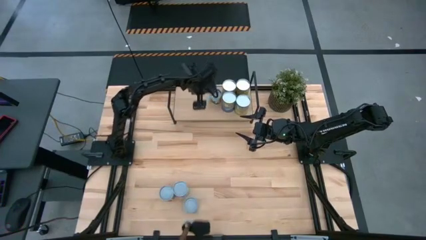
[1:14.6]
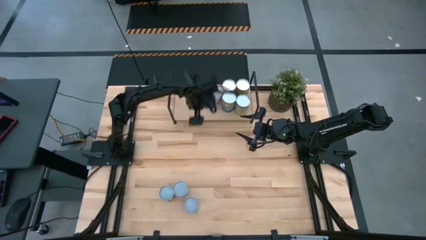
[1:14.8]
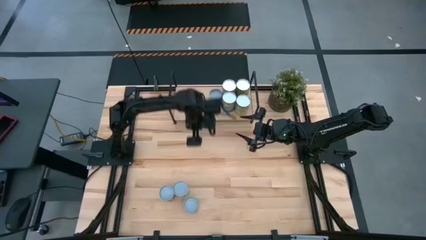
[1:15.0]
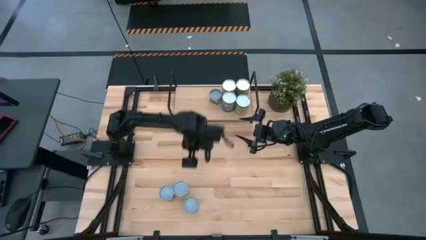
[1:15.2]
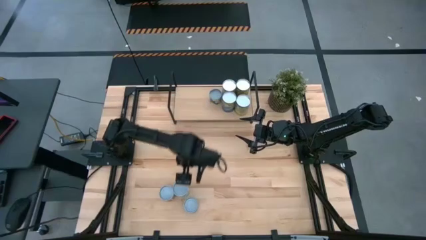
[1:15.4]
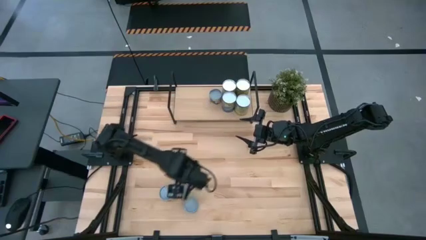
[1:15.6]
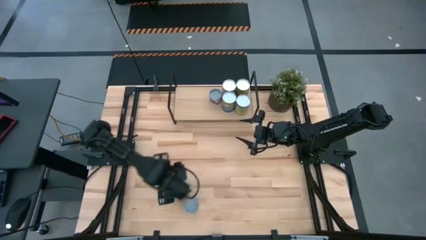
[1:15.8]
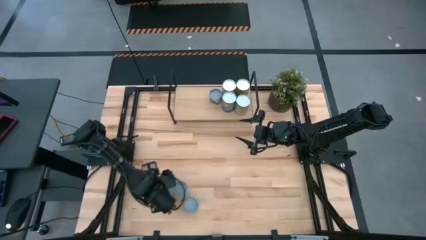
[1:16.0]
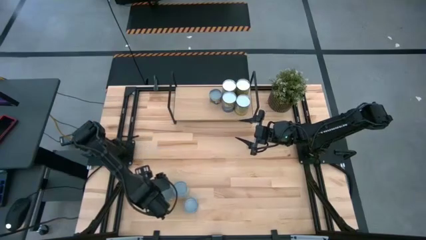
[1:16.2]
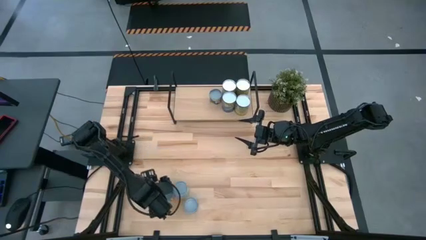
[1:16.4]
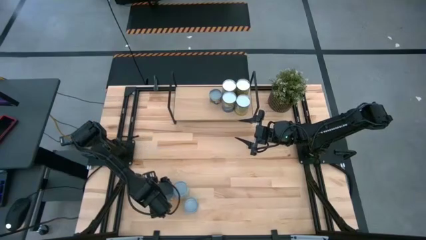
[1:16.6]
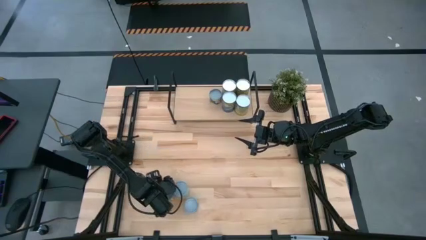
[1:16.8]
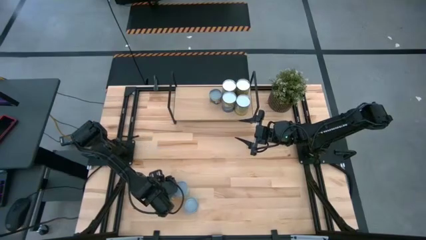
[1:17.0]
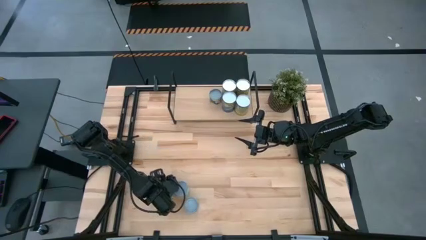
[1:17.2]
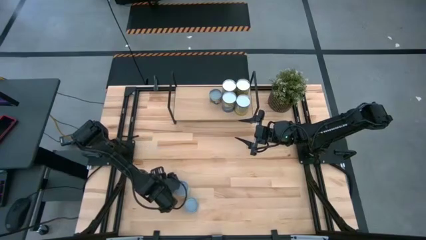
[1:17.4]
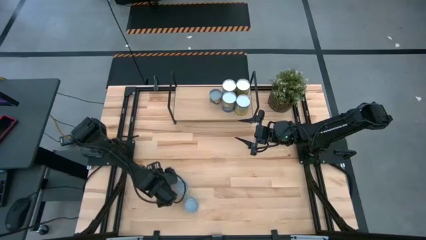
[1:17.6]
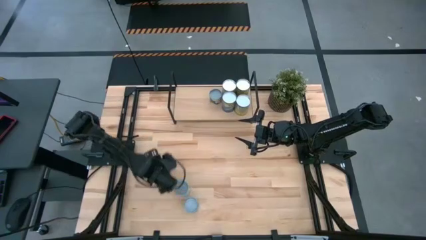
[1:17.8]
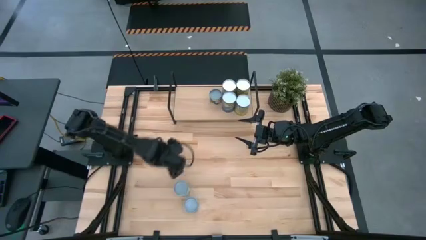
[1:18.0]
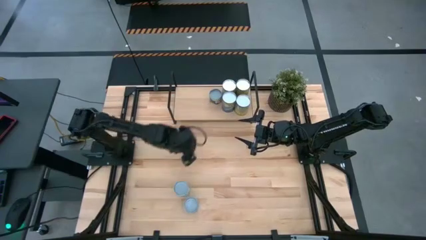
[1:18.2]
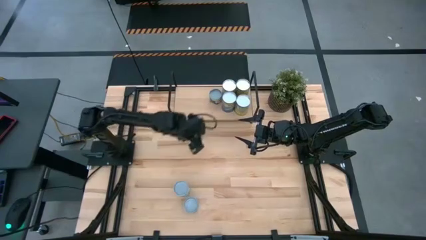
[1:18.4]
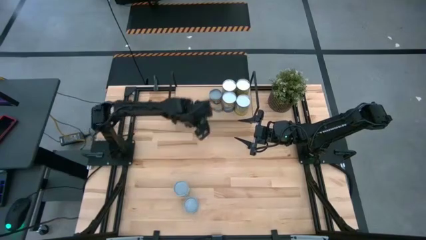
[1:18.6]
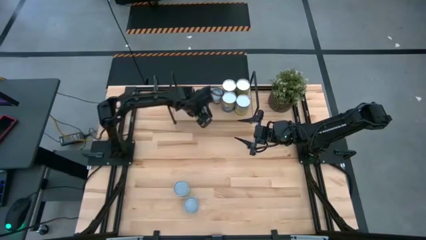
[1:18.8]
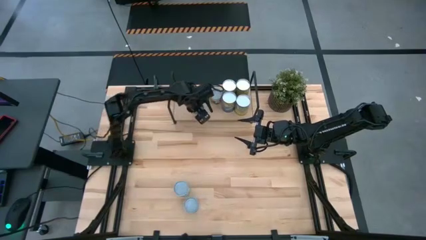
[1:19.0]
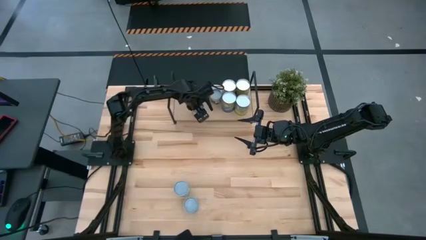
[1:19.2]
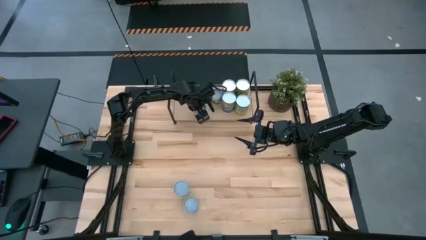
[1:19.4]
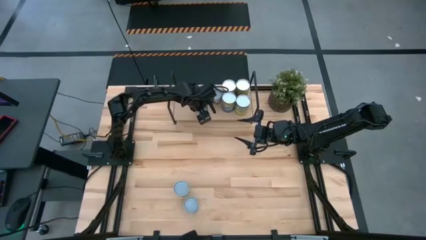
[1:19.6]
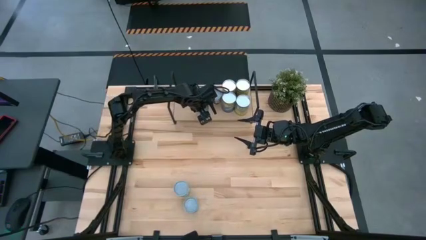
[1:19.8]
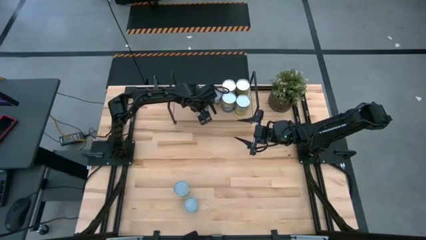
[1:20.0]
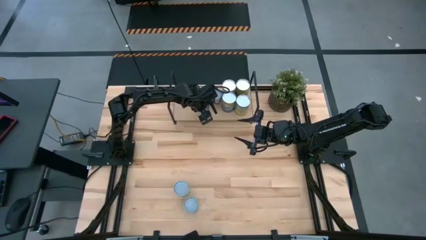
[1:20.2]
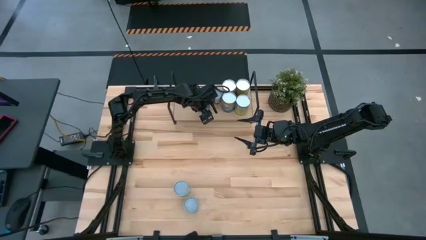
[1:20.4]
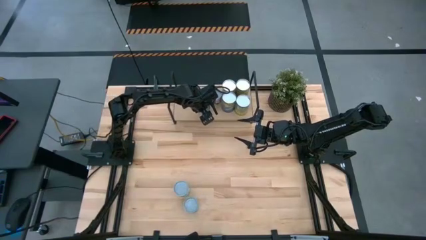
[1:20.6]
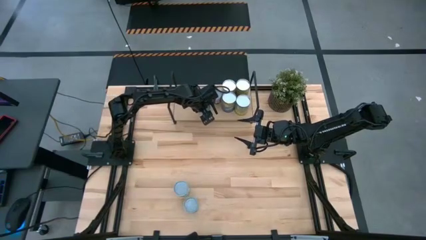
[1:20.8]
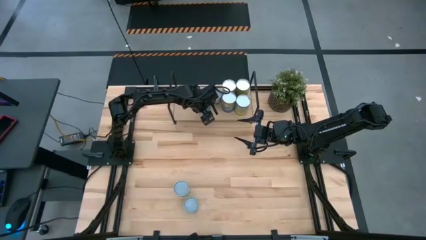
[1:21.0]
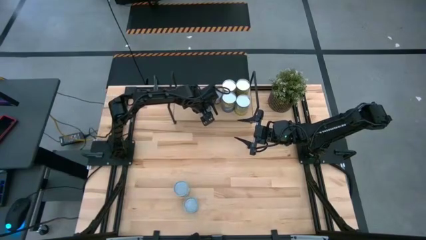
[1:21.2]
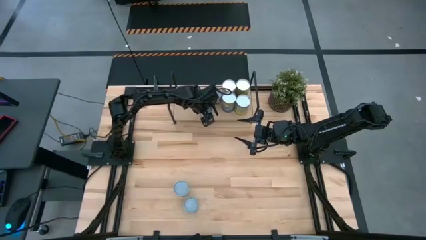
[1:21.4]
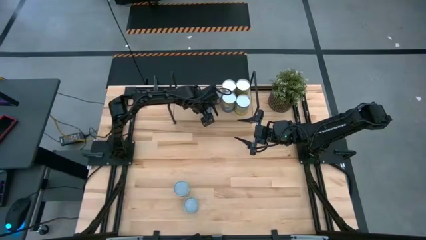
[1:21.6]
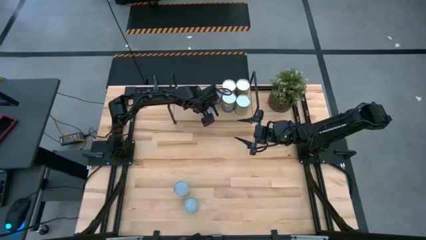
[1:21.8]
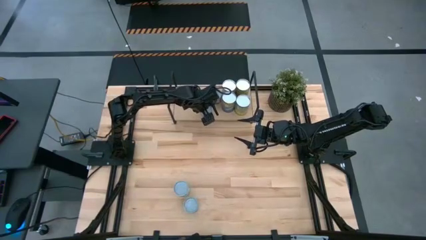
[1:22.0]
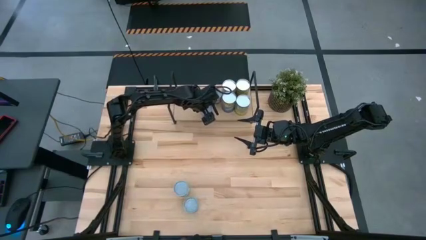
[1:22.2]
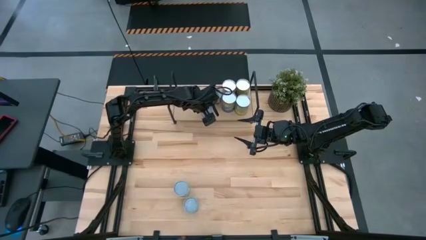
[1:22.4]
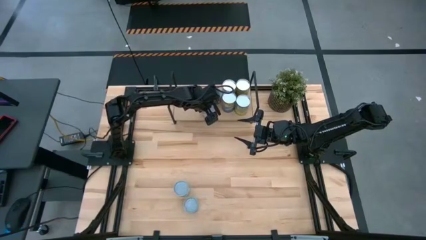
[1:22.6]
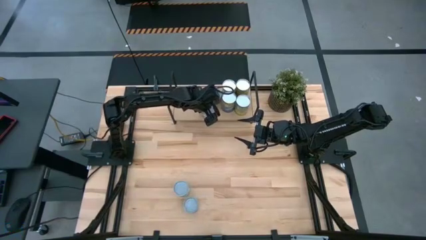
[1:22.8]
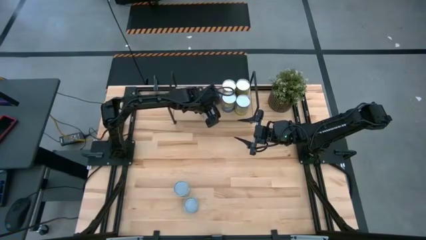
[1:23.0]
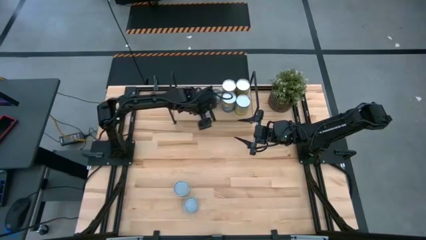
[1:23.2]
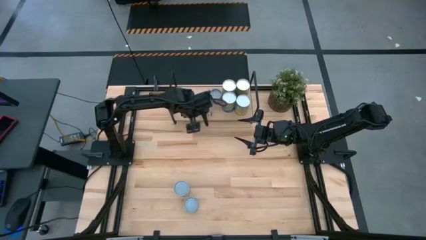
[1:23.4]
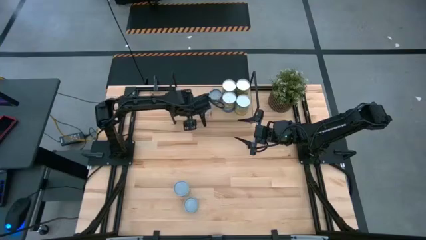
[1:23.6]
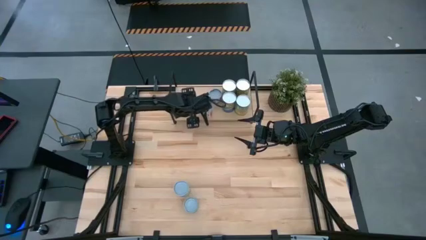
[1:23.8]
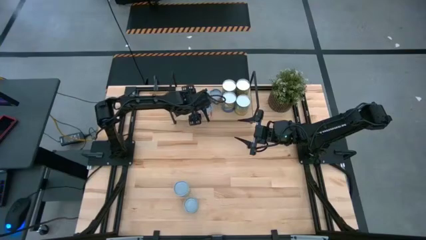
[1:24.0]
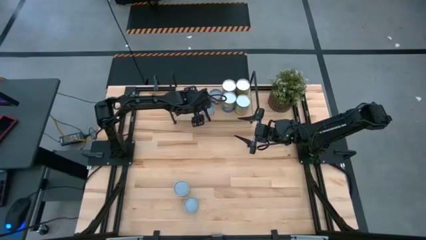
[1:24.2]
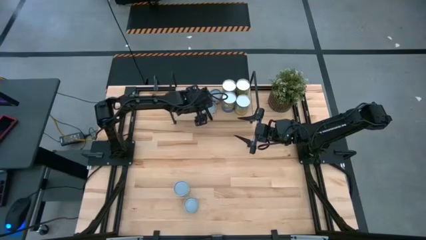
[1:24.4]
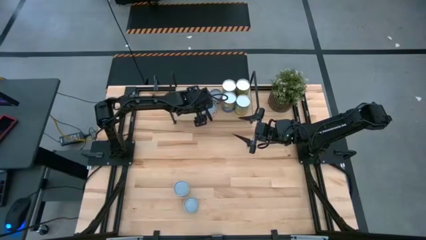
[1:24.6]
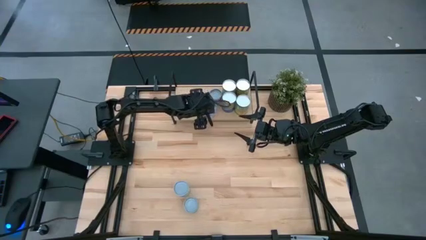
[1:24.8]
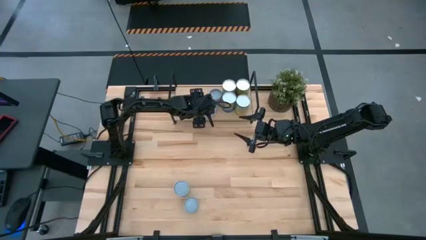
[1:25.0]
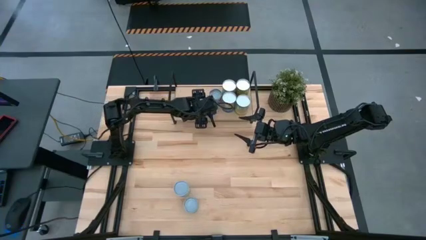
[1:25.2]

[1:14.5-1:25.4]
Task: Pick and place cans onto a shelf
Put the canned dice tomatoes on the shelf

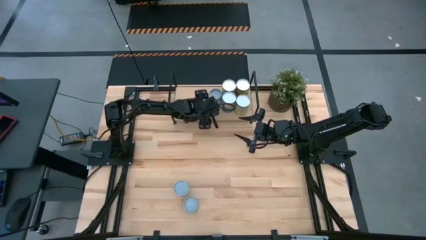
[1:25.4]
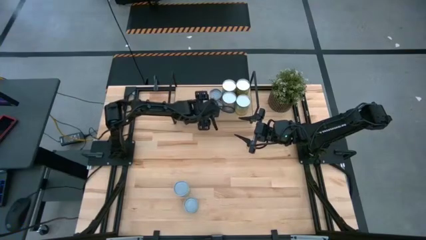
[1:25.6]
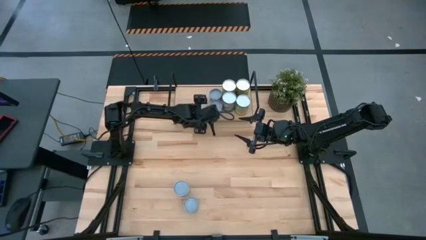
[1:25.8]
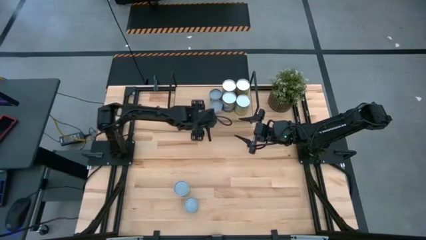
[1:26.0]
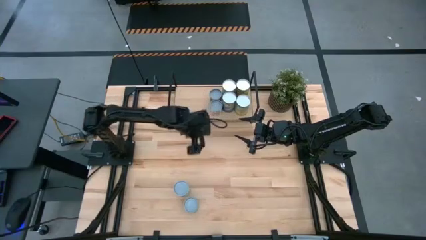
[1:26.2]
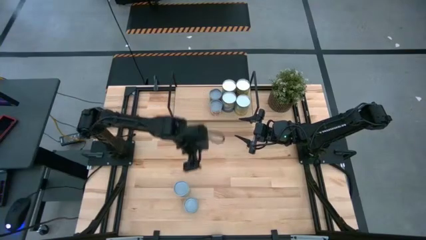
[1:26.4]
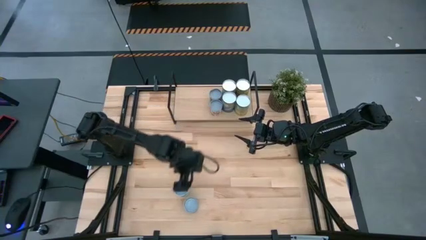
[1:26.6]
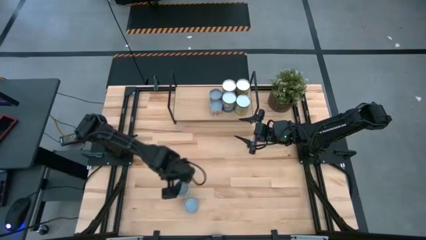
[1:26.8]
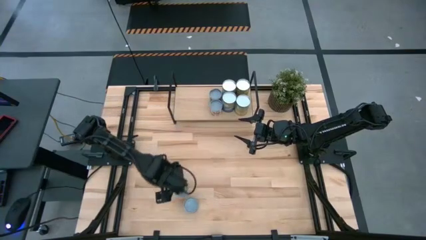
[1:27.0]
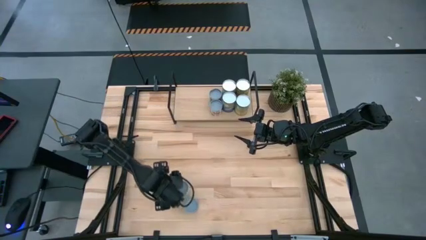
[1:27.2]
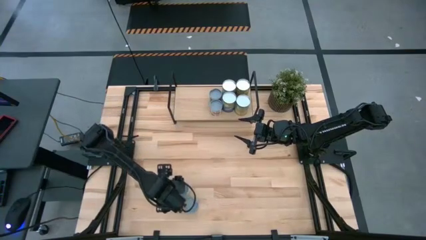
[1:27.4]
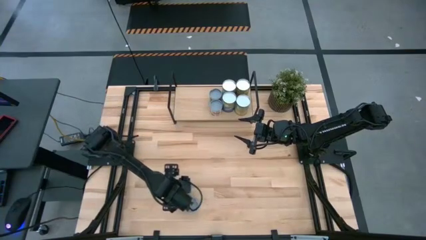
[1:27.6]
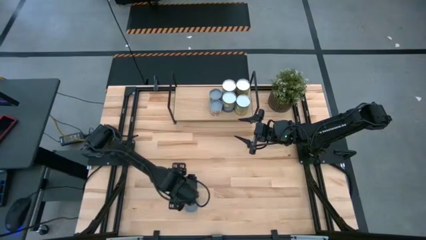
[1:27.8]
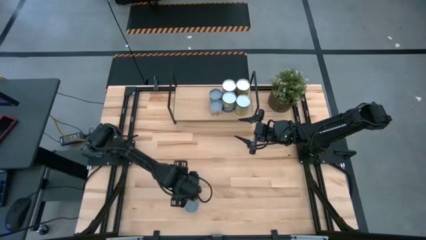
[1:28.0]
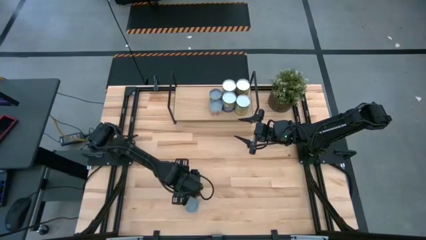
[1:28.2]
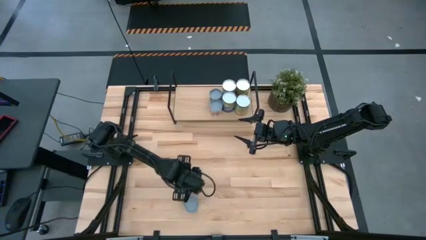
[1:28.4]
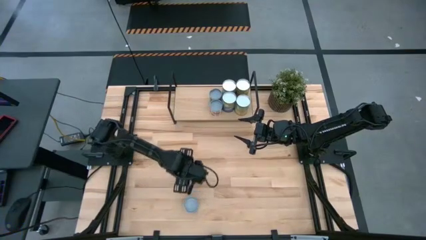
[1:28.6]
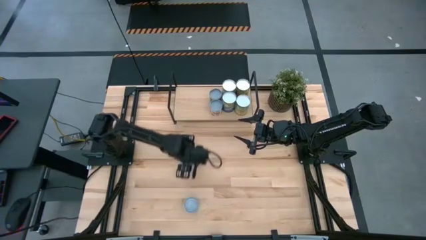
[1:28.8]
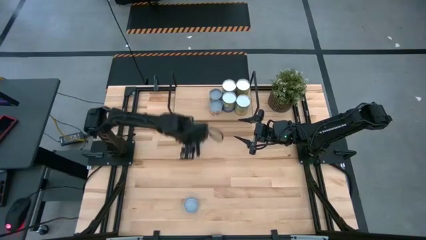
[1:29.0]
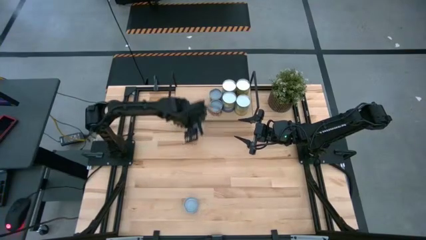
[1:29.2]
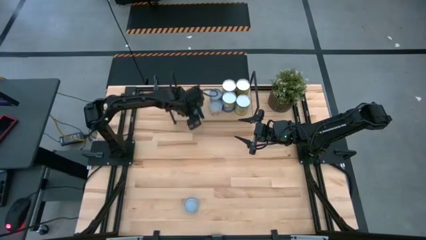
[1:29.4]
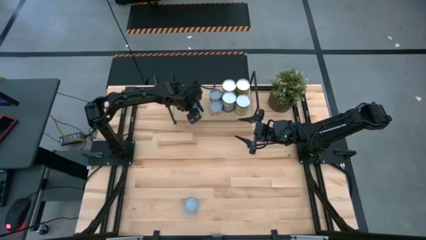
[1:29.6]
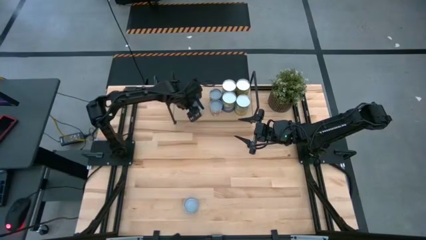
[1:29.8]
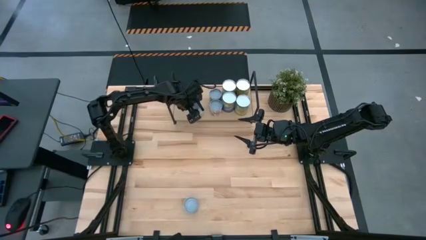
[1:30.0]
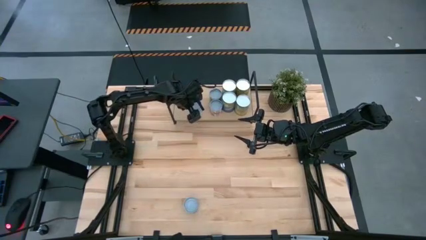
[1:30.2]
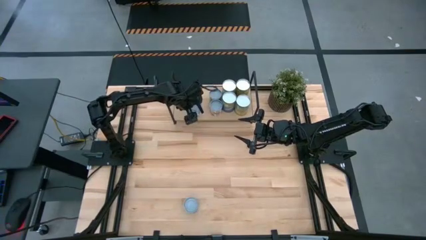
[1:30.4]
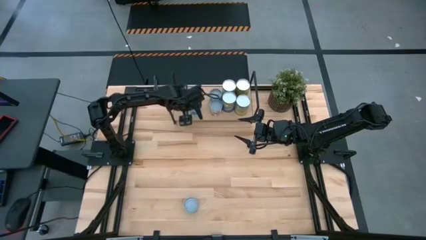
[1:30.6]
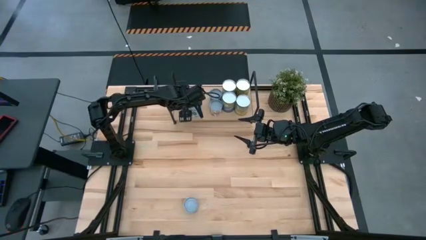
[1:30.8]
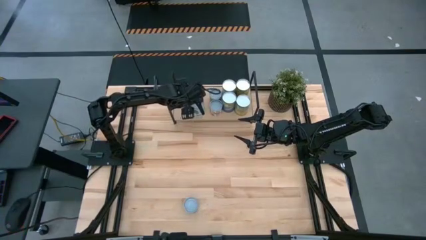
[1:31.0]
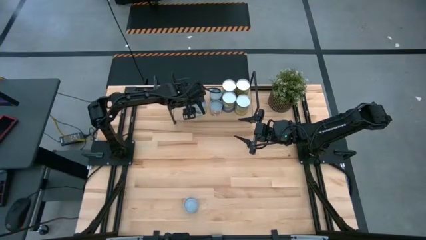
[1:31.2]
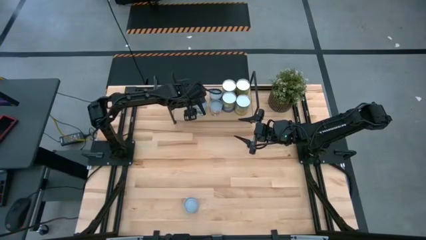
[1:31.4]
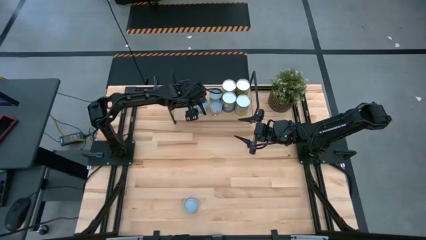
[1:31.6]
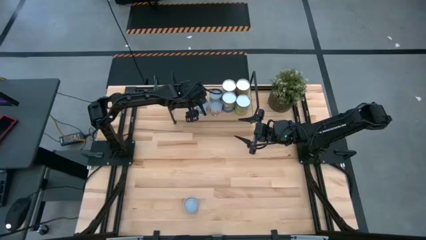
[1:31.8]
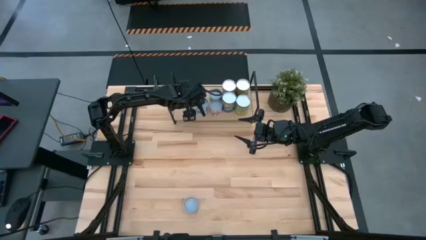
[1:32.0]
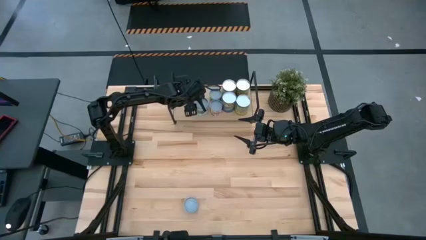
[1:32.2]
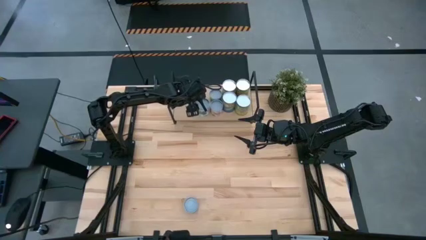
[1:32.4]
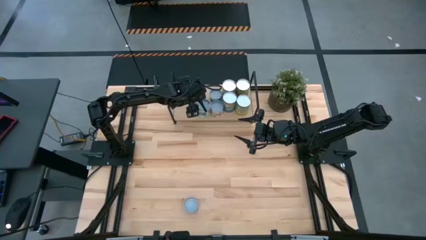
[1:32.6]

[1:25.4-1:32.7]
Put the canned mixed vegetables on the shelf
